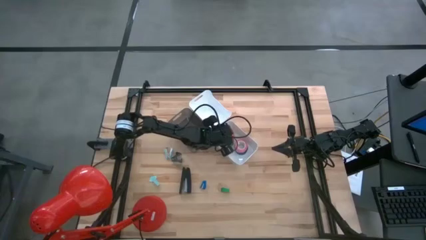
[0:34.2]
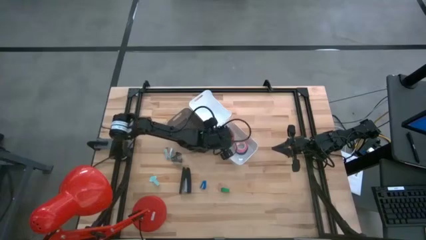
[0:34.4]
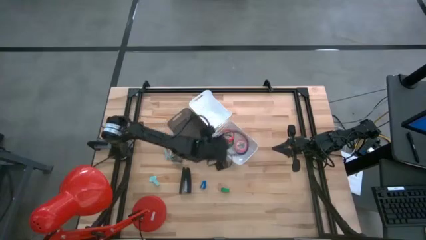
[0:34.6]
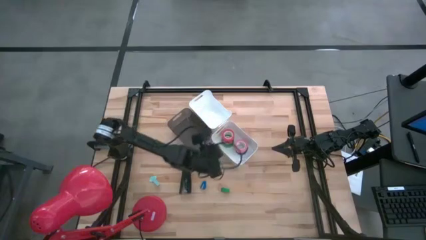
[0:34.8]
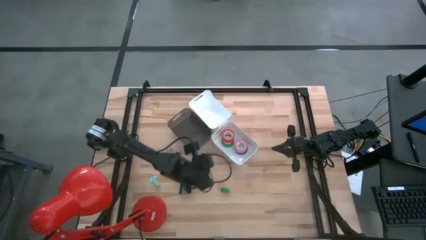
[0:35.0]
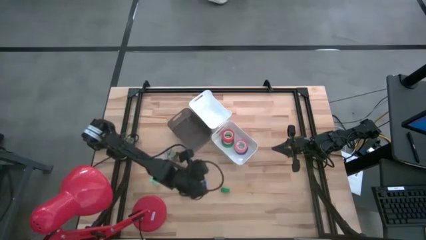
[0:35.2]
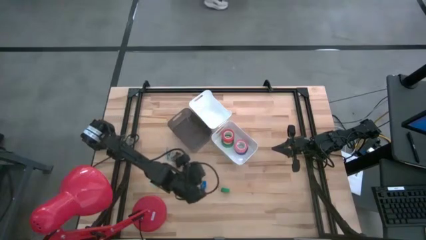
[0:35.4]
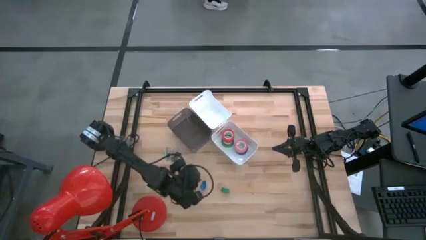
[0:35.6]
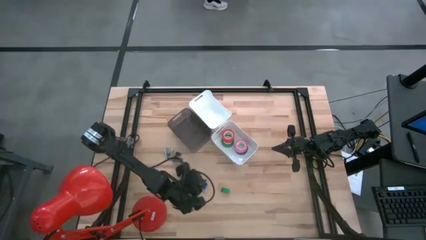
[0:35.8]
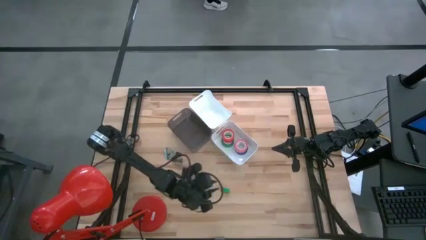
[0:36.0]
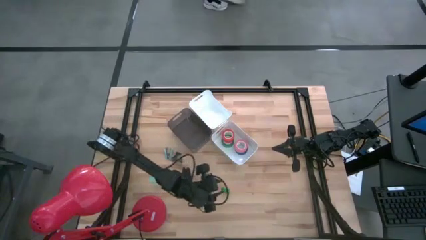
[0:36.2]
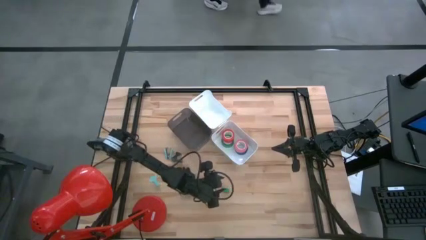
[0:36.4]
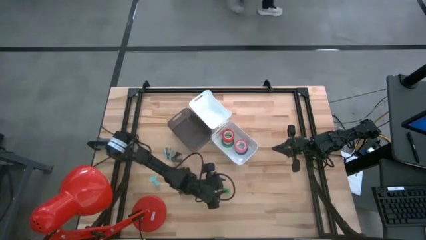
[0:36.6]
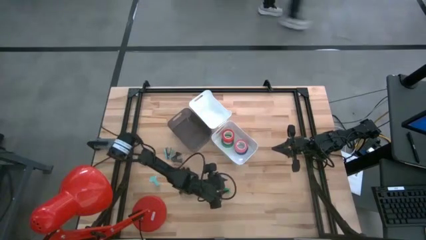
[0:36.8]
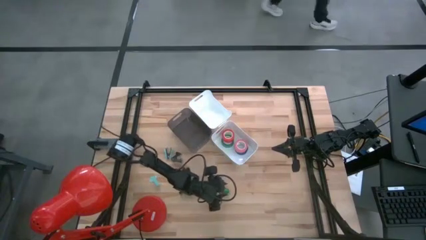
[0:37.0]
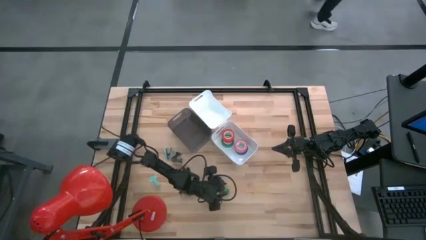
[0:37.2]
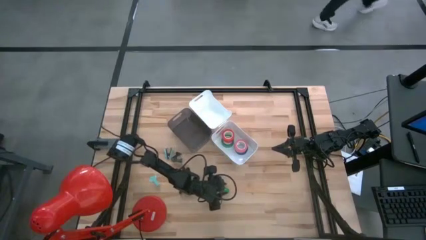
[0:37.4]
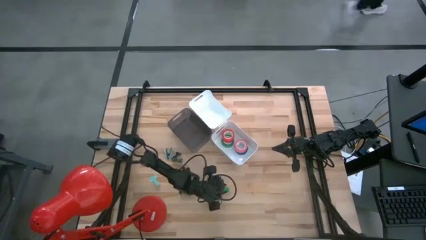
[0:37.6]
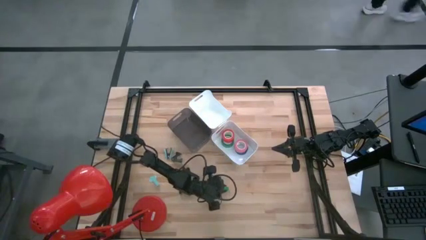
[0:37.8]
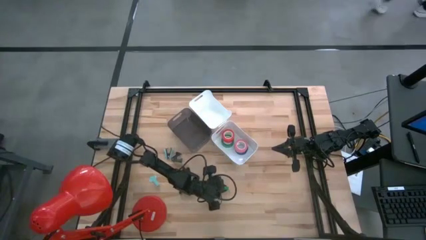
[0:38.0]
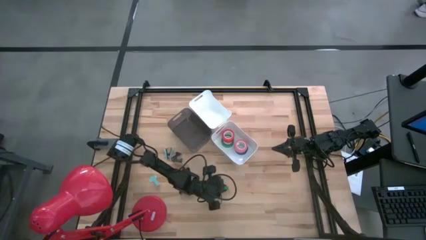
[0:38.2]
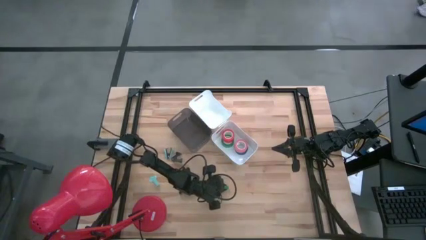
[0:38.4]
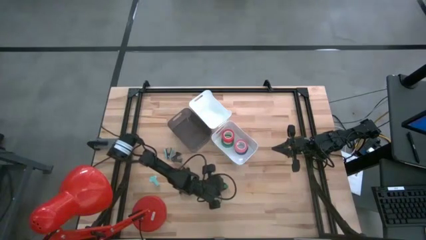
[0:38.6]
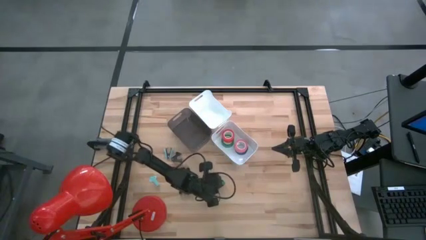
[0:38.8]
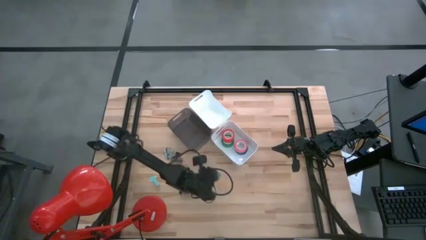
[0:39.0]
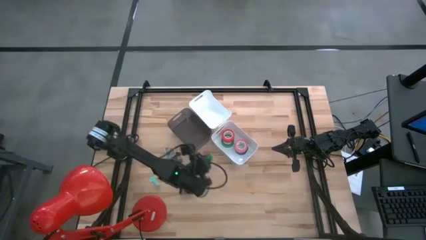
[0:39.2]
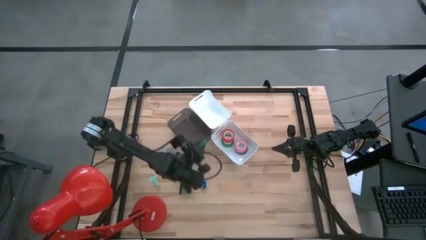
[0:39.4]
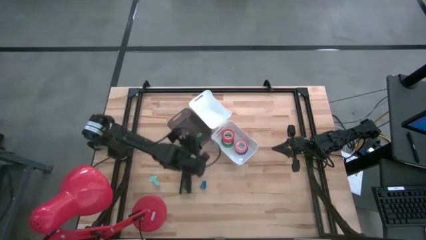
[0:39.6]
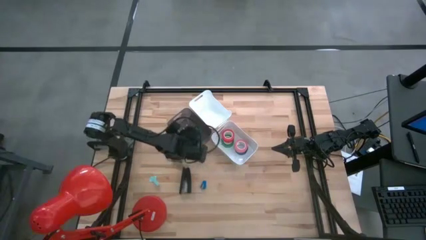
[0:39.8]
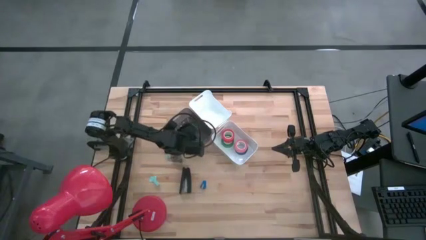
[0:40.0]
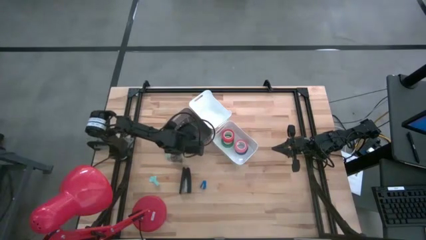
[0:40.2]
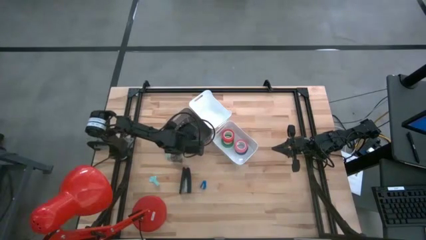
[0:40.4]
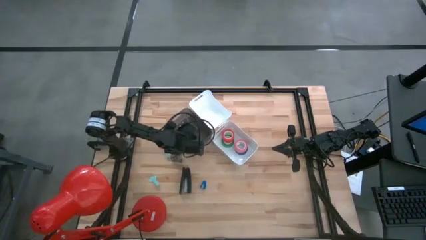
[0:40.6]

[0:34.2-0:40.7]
Task: Pick and place Stapler, Stapler remover, tape
Put the green stapler into the black bin

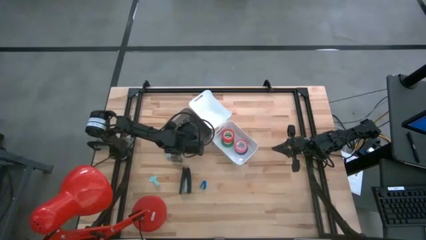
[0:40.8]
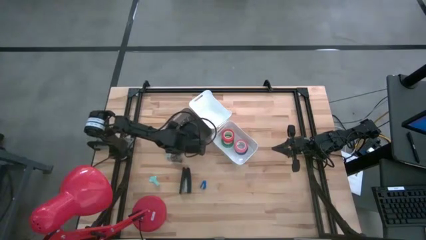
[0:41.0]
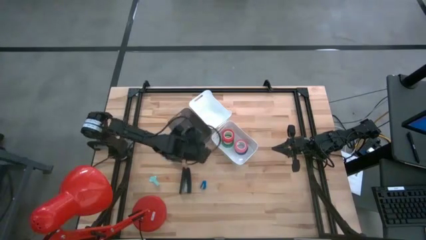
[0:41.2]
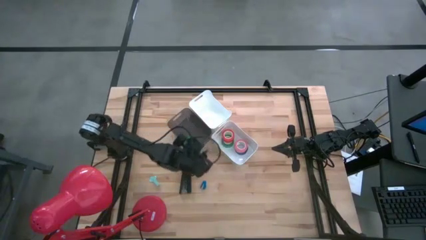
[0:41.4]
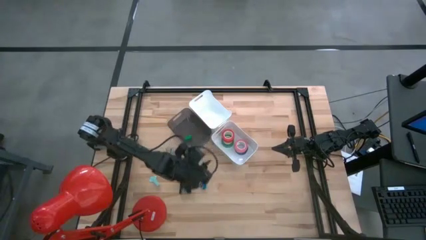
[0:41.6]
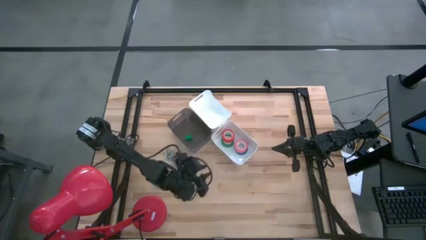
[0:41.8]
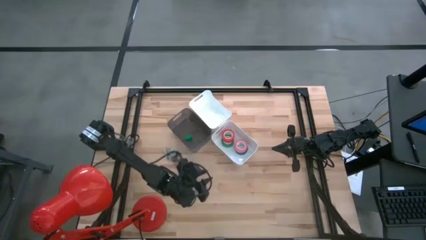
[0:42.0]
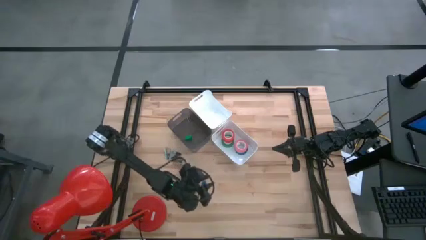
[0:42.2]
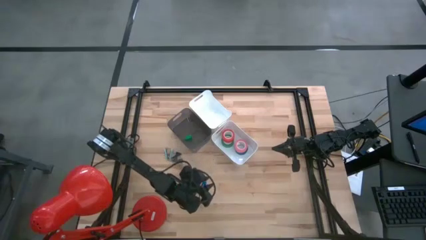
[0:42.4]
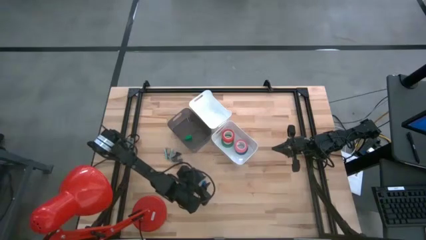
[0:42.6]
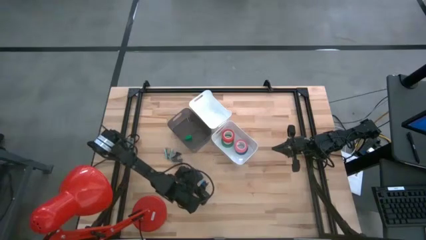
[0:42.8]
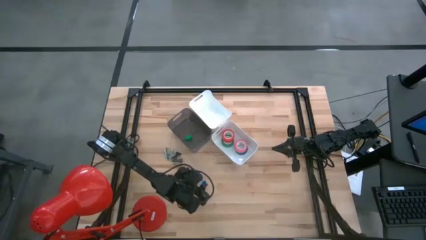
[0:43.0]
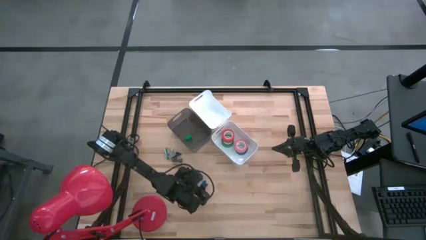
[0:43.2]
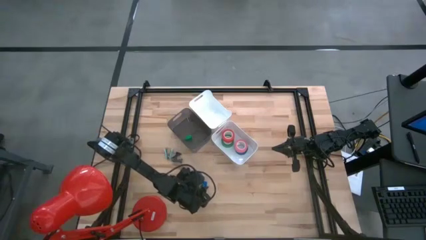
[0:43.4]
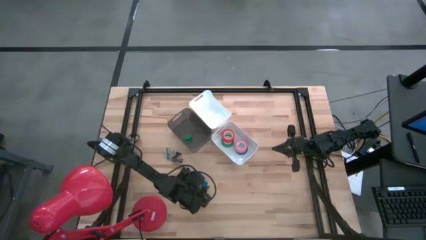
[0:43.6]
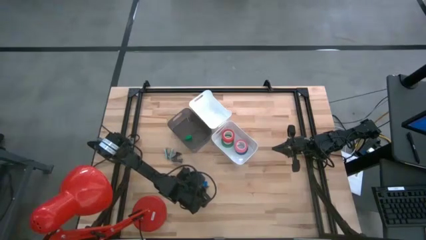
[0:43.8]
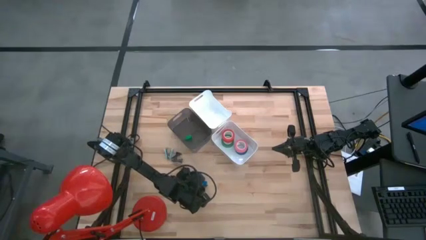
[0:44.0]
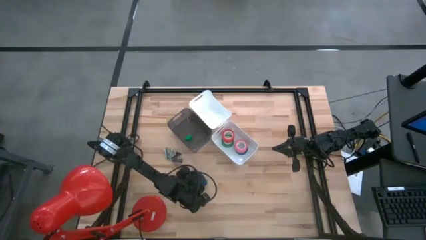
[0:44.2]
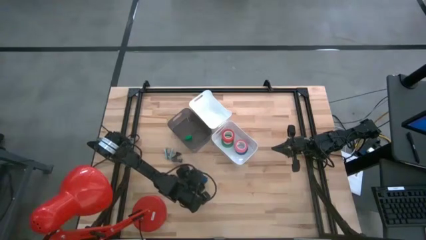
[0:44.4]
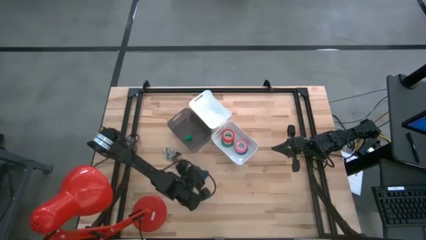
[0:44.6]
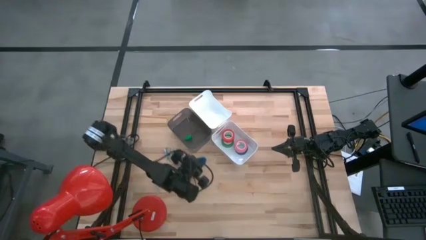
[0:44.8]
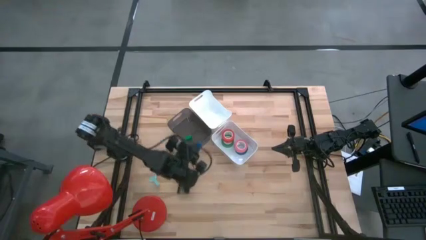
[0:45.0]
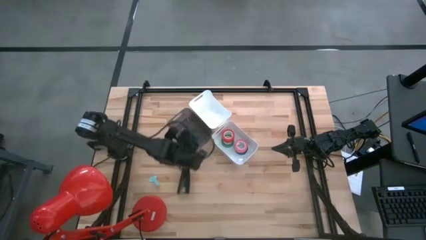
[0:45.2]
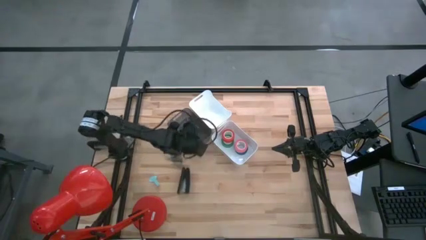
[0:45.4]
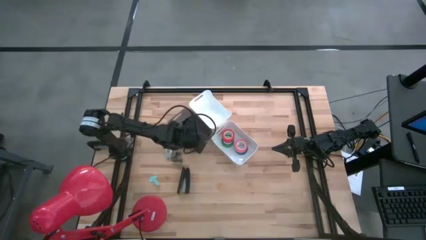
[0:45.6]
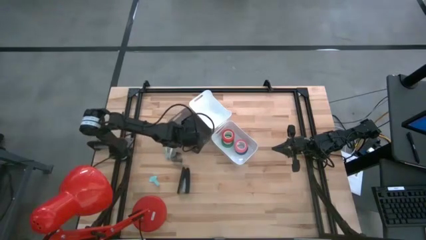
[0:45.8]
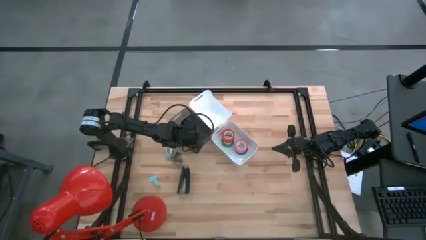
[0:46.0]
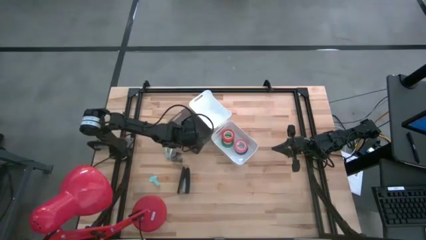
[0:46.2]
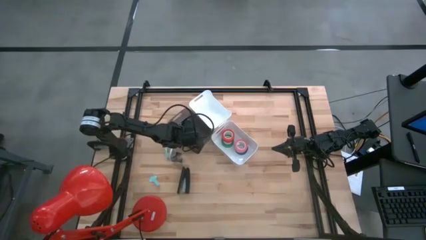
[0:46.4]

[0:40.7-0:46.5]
Put the blue stapler into the black bin

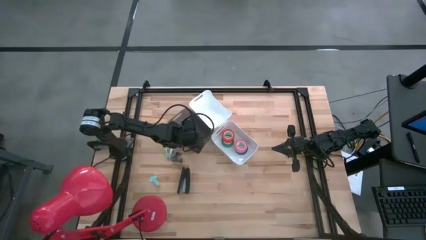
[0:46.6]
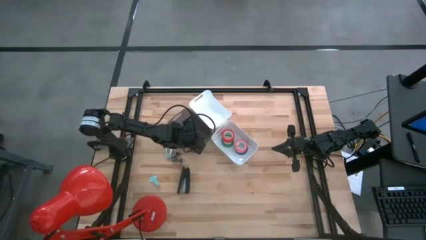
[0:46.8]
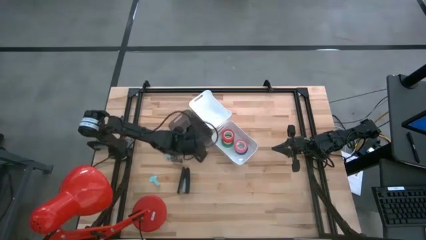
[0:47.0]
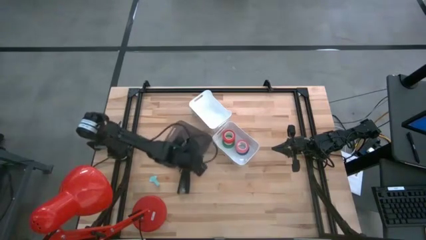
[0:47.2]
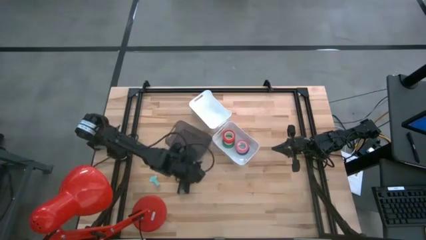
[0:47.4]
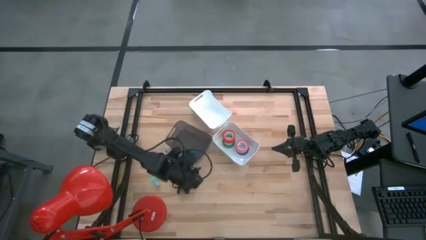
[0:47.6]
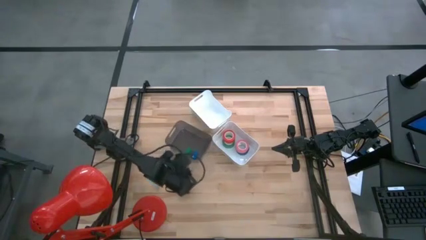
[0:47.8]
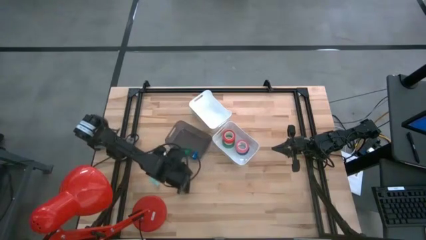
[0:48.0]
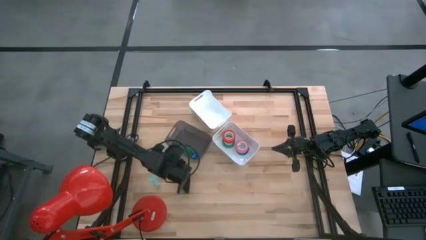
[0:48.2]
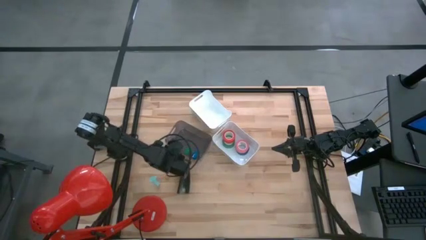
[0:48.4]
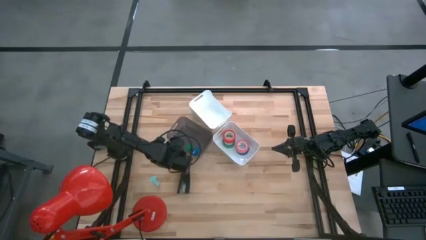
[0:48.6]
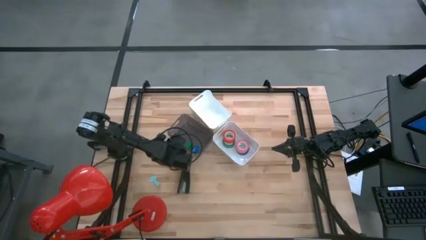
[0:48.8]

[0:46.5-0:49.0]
Adjust the black bin

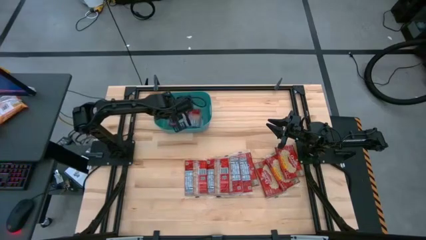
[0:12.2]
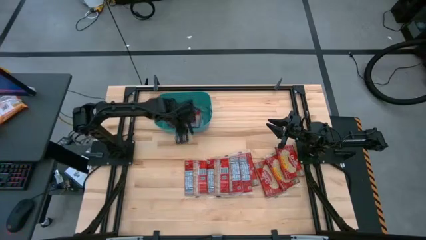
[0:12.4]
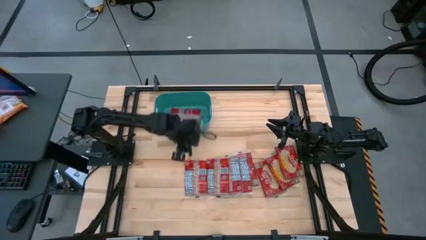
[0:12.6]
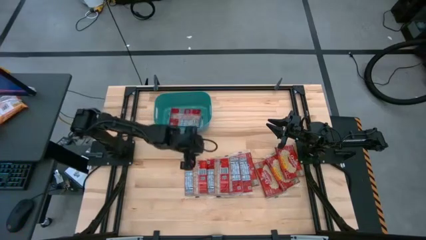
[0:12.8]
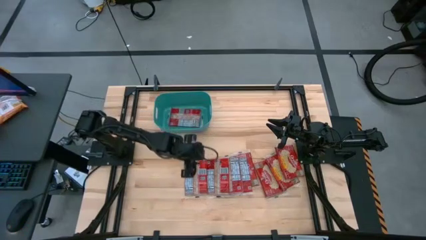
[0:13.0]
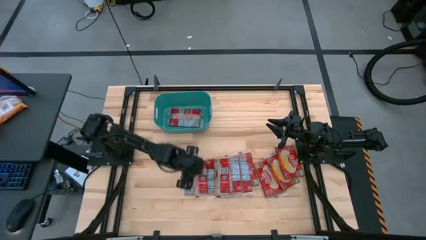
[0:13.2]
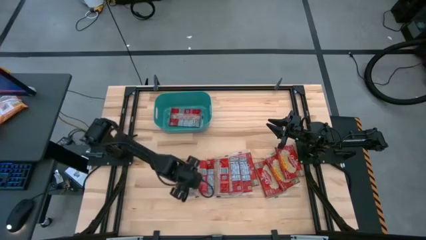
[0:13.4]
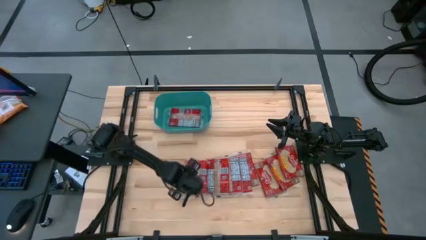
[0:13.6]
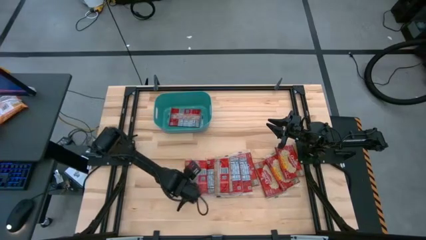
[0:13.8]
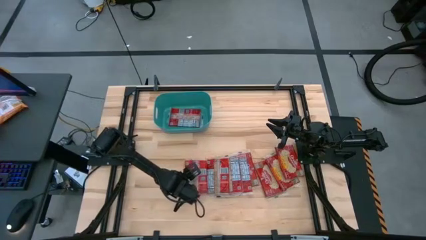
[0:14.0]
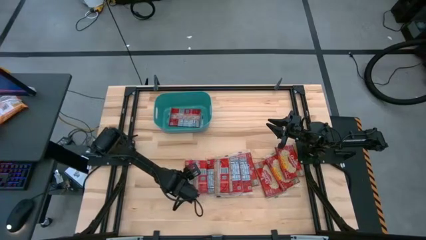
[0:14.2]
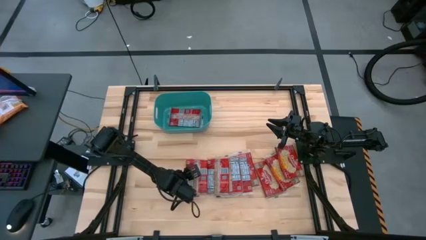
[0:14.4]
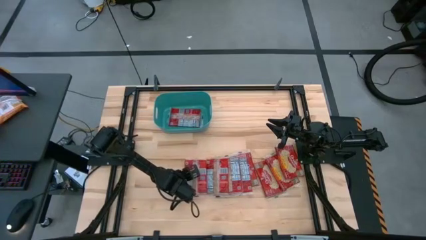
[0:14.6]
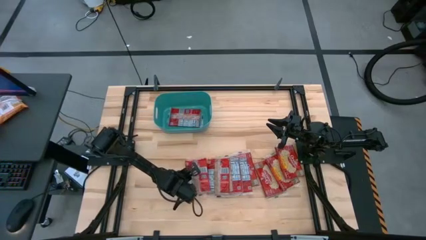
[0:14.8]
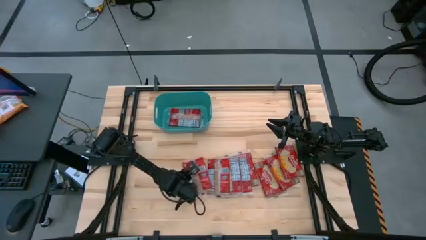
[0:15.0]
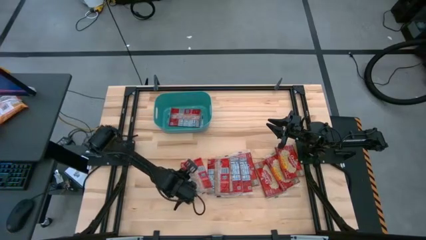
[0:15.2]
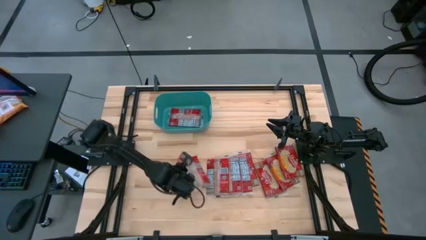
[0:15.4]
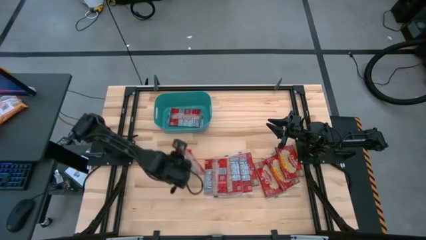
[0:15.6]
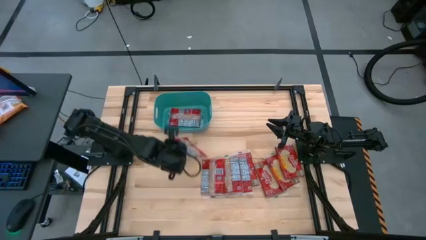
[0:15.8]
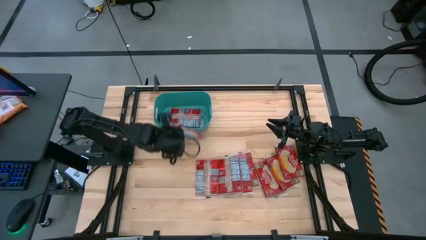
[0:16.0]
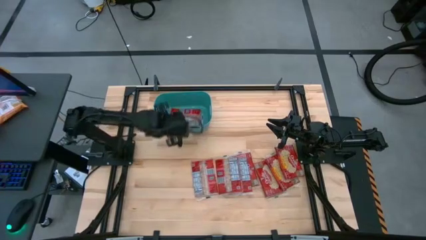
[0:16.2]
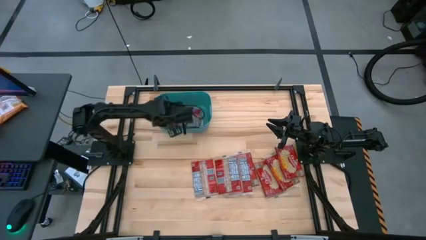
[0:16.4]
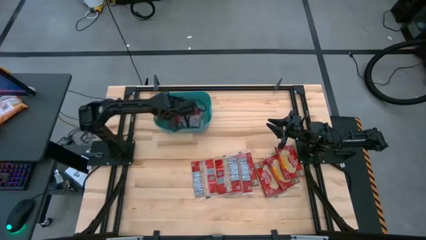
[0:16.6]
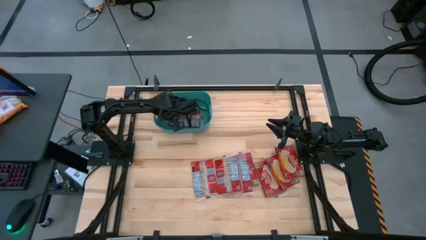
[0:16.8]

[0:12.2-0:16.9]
Task: Sort popcorn bags into baskets
Put the popcorn bag into the green bin
